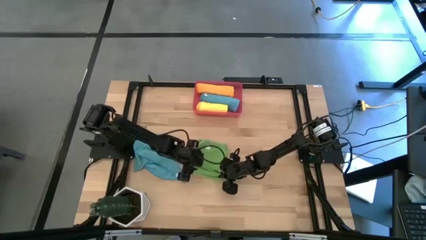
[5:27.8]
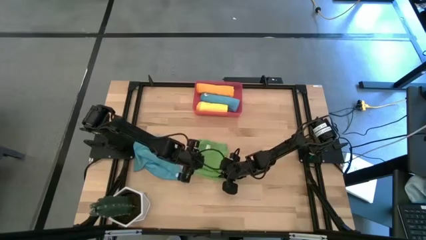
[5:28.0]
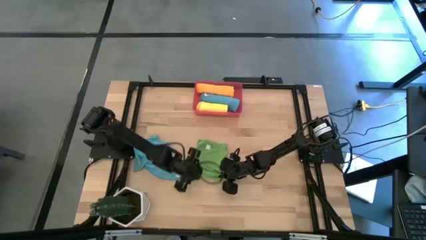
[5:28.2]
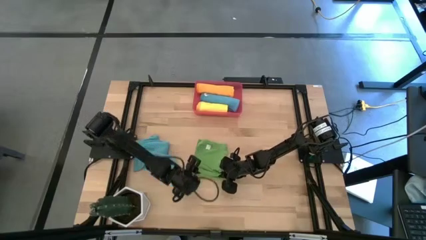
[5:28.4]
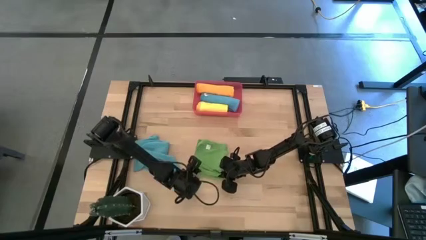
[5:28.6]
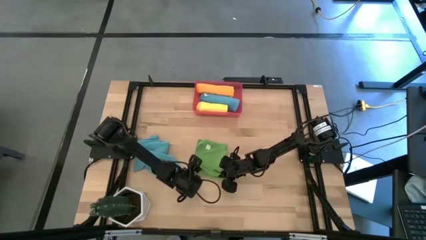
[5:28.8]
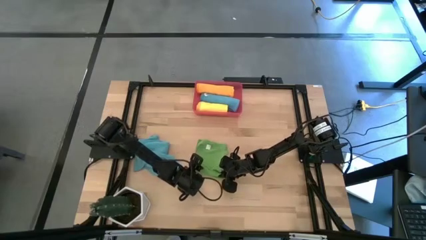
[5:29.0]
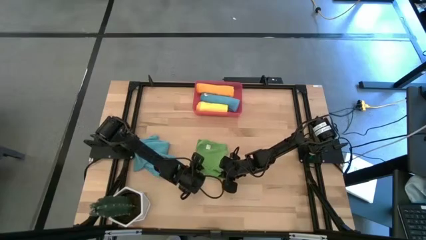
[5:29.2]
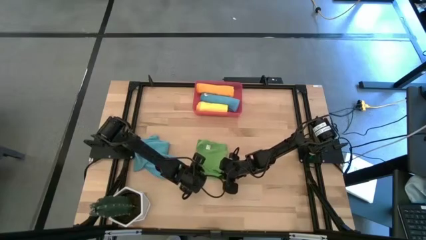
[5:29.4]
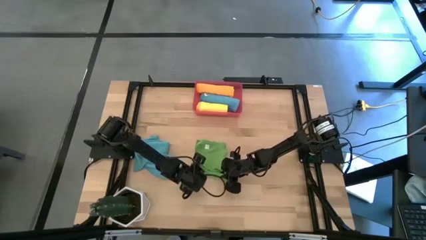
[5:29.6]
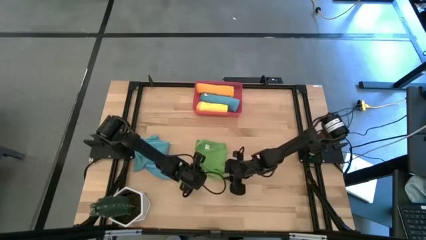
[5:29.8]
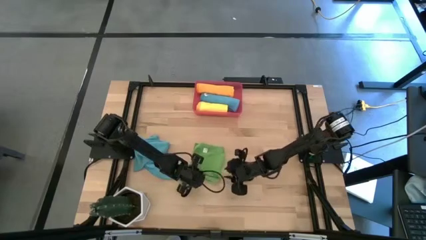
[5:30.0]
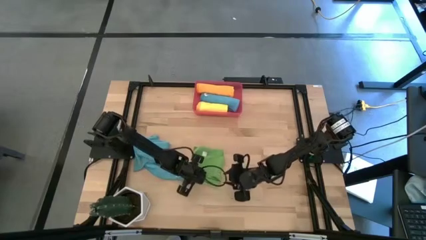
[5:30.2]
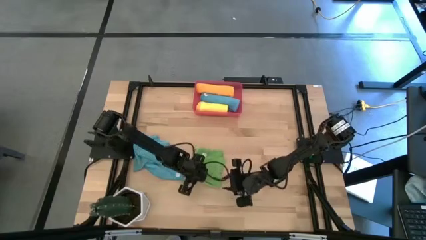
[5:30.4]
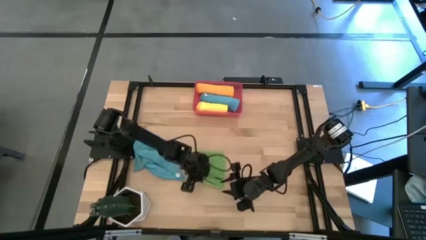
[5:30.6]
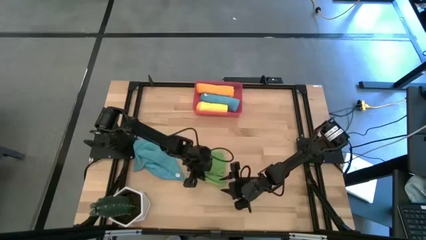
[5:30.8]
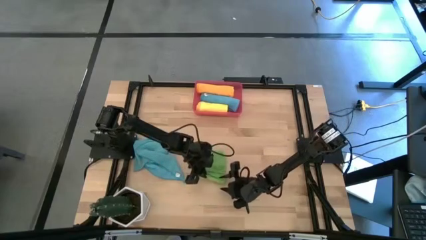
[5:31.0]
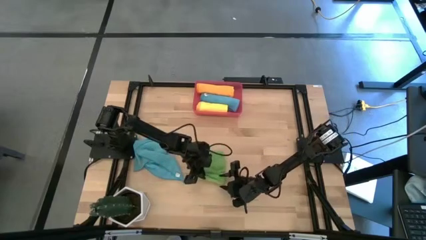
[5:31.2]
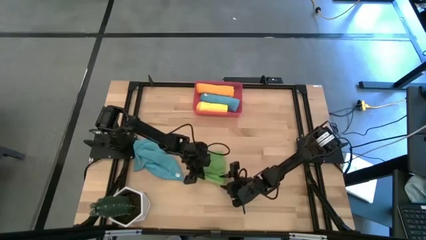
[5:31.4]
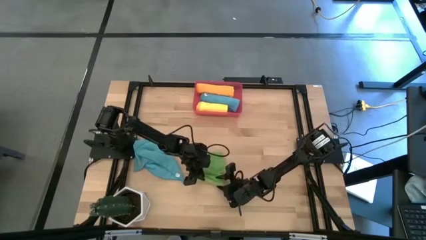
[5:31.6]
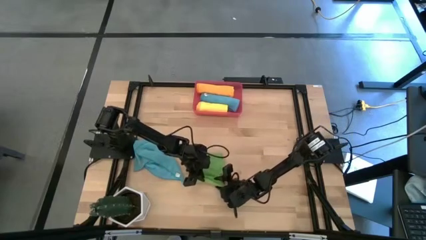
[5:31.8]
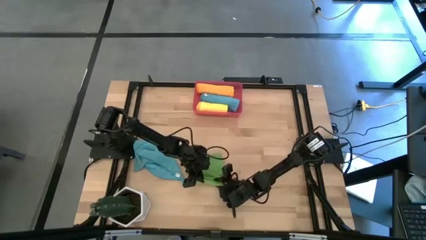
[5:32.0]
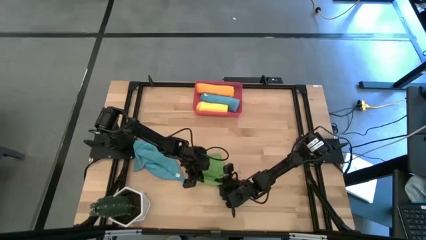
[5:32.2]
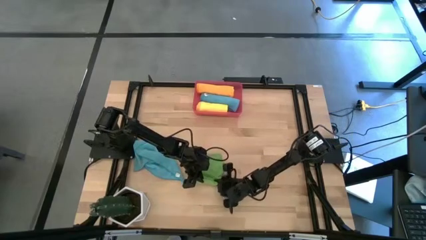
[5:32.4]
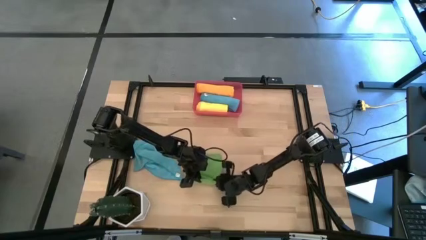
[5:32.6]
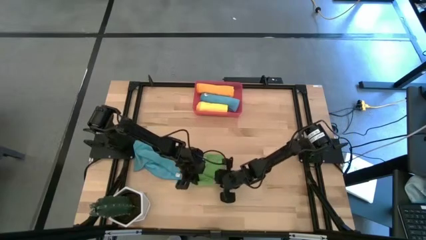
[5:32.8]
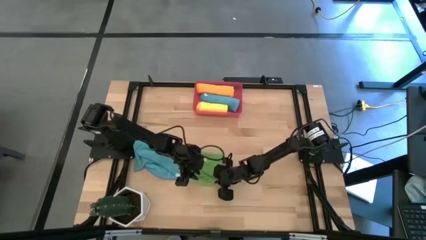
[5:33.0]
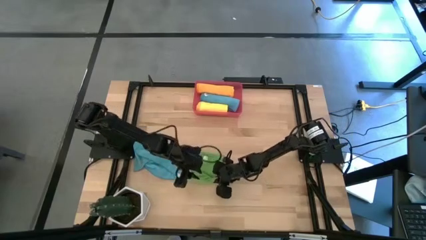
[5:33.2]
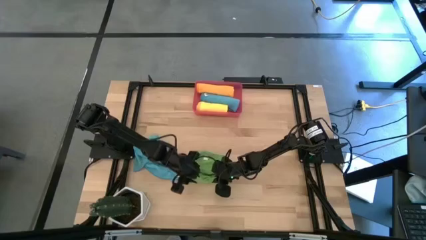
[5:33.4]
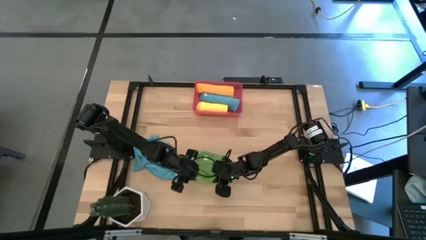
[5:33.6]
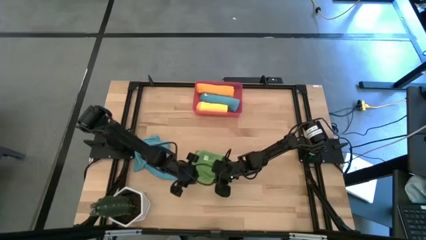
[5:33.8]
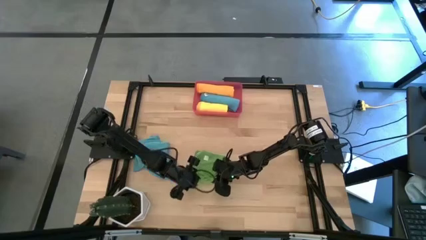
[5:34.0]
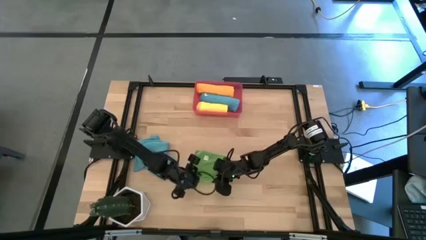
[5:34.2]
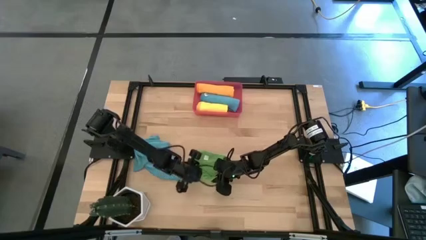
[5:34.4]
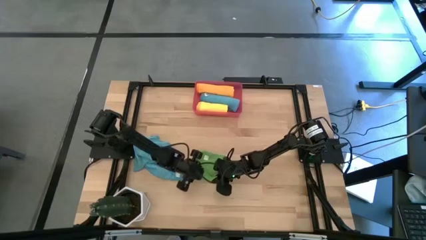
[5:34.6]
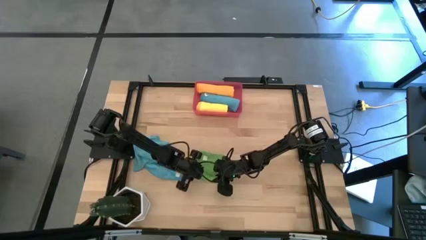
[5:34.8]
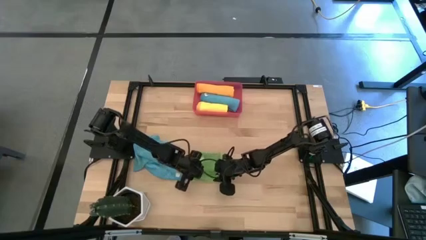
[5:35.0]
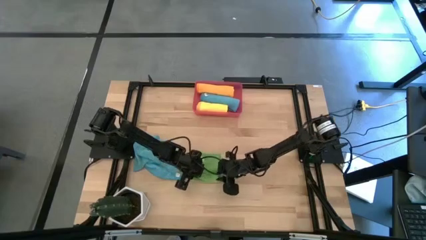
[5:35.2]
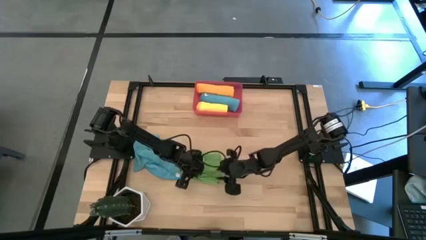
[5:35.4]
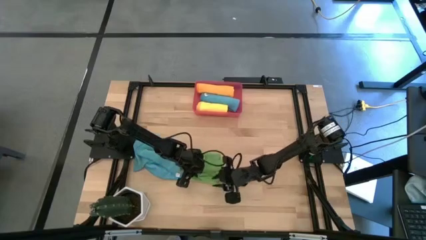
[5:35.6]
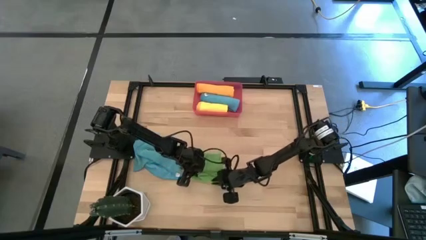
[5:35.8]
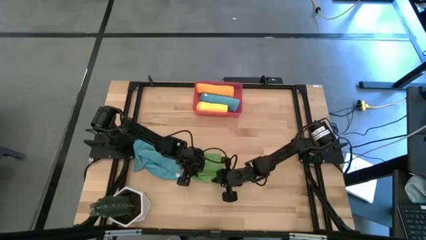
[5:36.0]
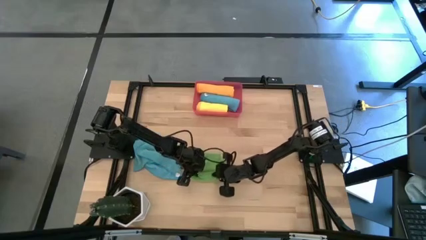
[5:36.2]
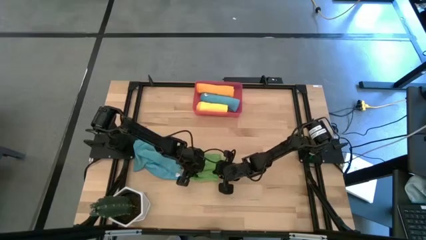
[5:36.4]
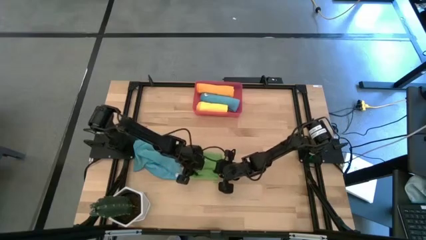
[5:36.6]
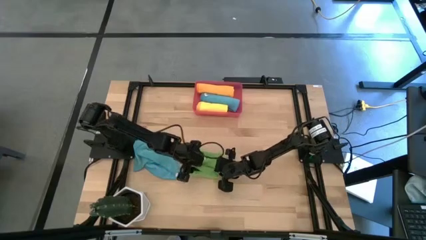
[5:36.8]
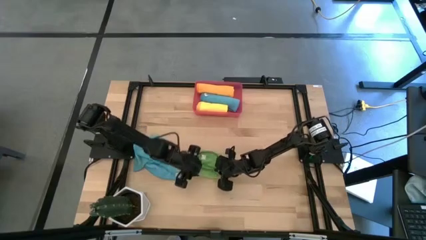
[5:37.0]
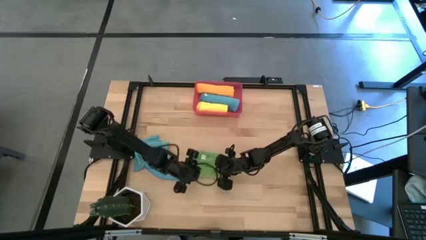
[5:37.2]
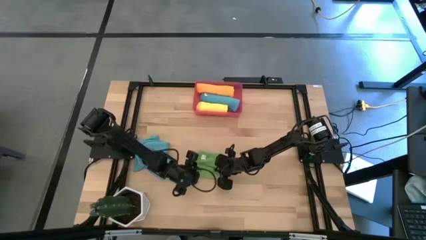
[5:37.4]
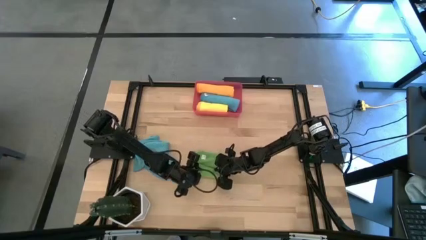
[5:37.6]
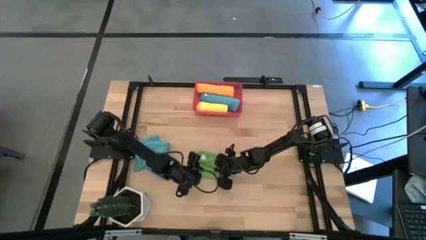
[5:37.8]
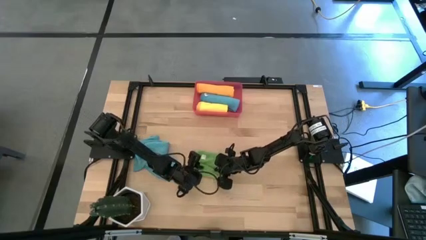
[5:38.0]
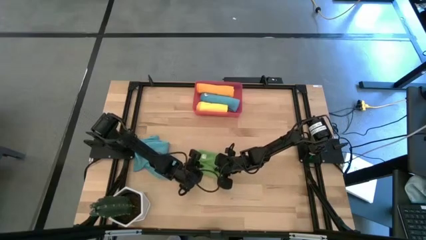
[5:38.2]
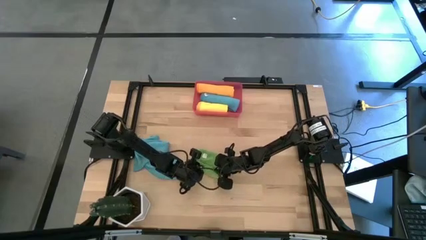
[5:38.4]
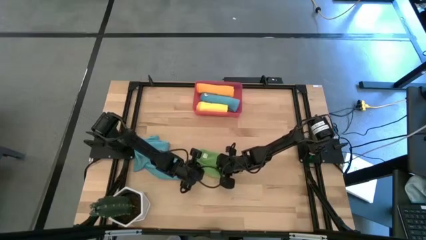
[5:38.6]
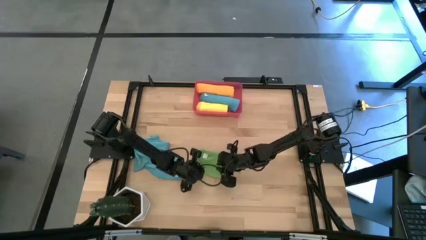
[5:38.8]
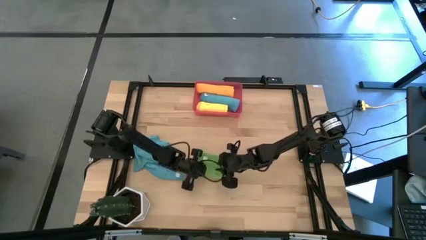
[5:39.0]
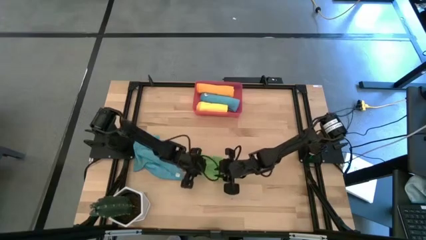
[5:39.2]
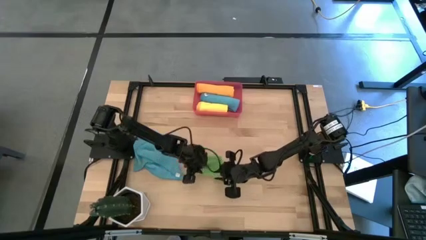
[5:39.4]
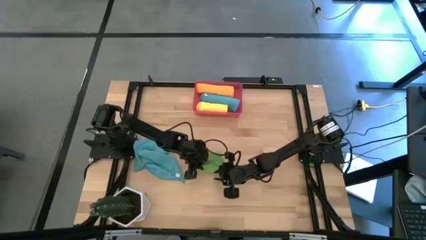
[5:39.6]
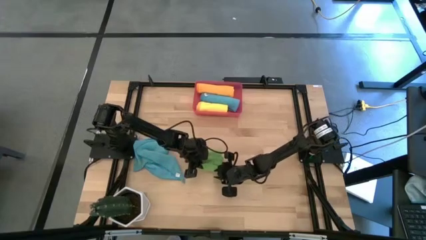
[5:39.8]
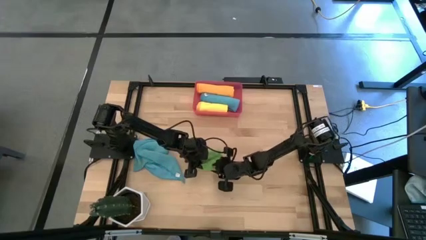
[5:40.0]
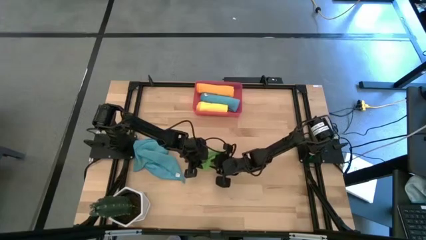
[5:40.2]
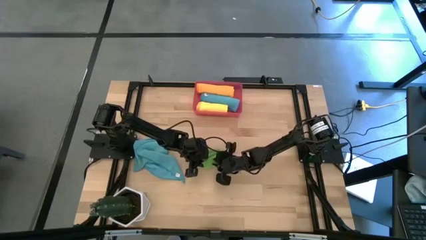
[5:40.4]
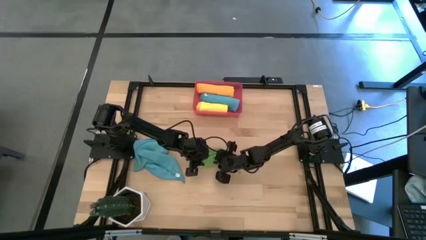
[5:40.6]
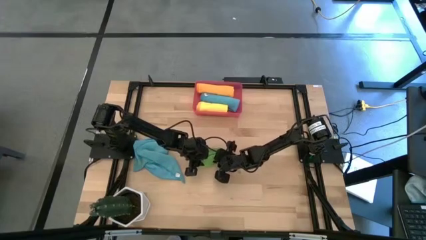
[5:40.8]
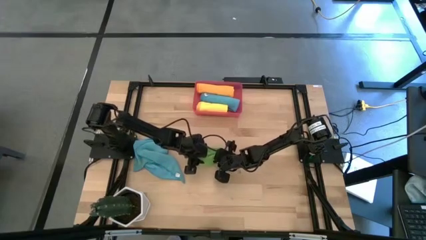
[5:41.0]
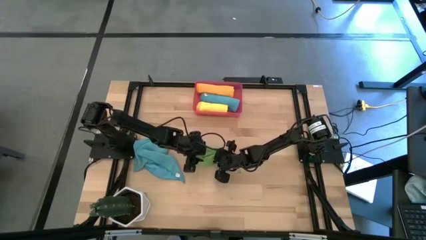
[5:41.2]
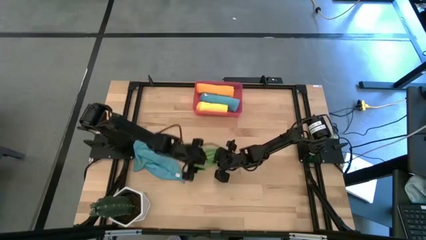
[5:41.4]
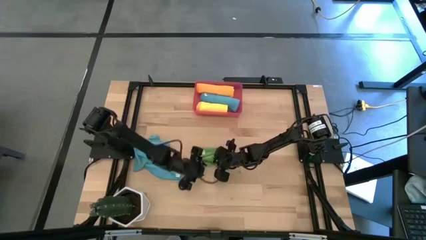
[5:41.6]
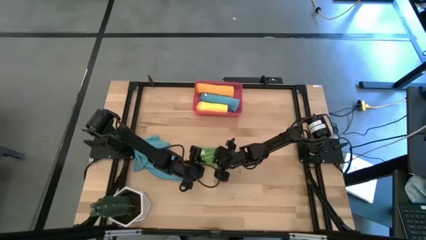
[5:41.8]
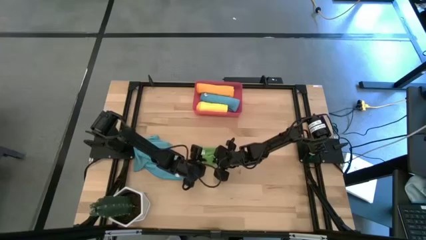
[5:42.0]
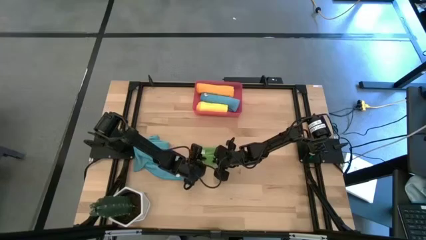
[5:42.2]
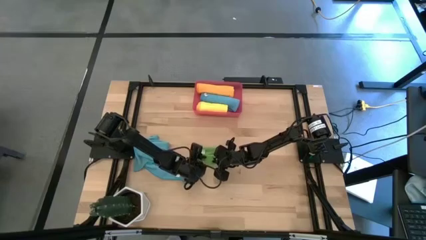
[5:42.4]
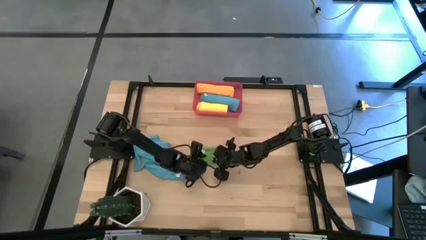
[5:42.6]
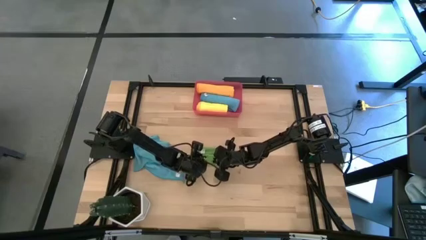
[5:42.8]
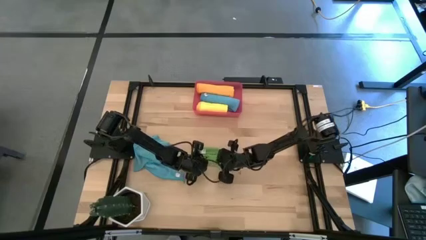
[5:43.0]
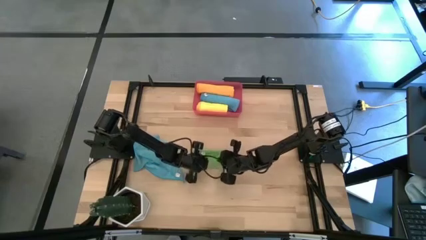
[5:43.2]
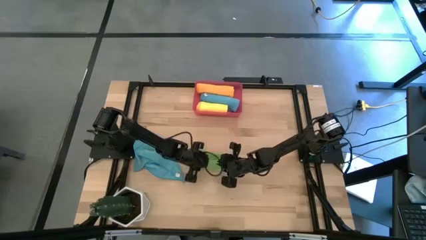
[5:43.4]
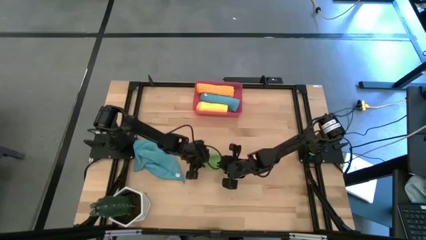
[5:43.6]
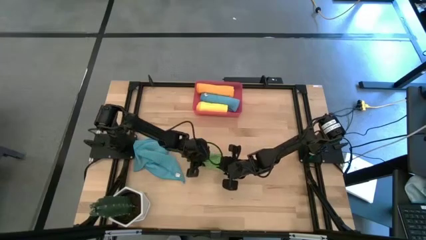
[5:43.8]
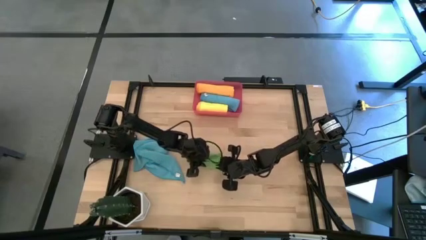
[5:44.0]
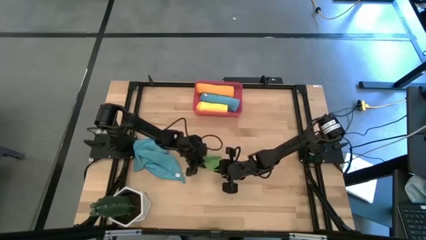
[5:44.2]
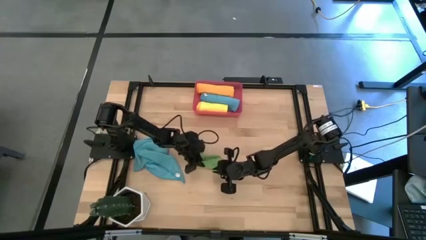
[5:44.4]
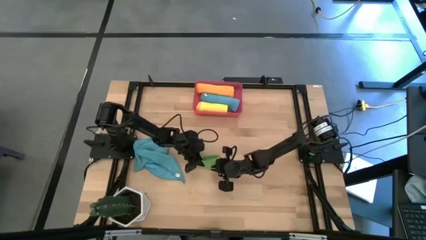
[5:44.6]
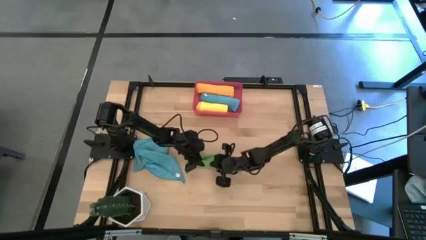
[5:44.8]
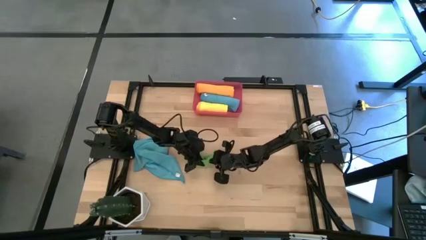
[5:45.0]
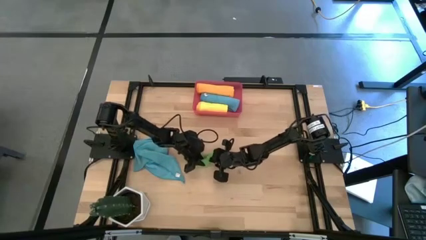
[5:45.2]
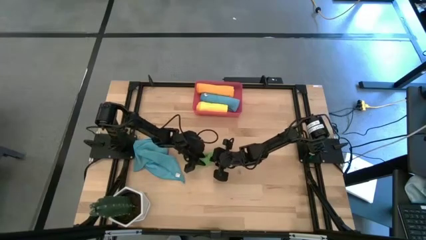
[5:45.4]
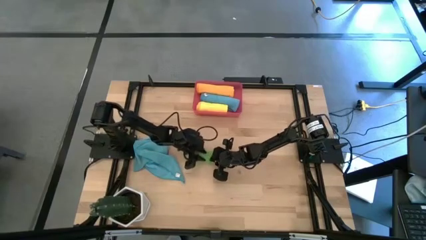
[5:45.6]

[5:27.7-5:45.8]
Task: Roll microfiber towels into tight, uniform cylinder then place into a basket
Roll the green microfiber cloth
